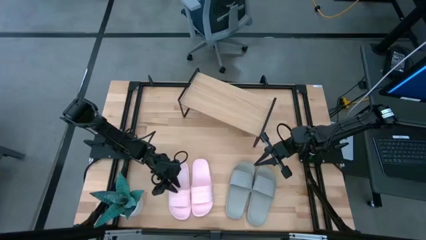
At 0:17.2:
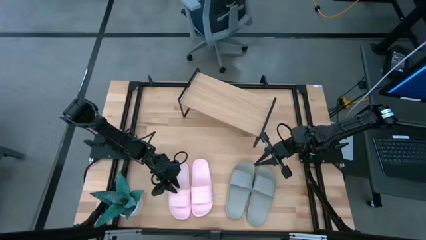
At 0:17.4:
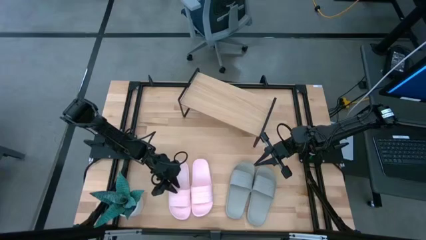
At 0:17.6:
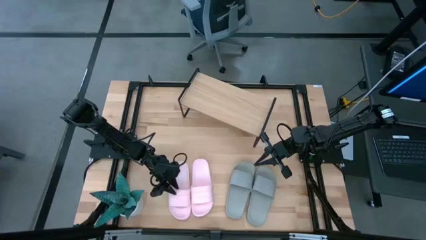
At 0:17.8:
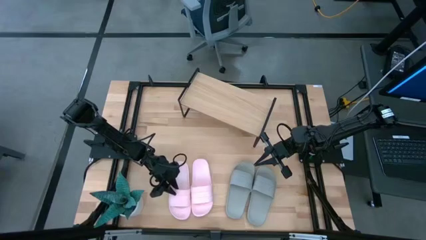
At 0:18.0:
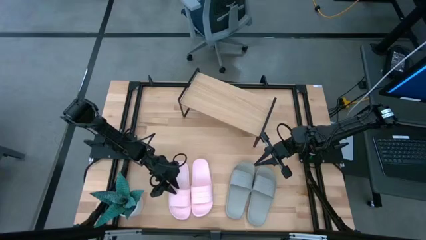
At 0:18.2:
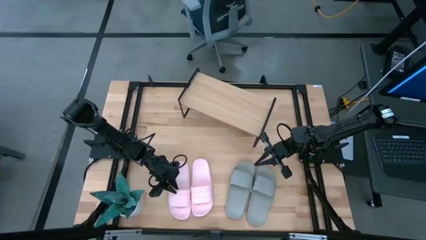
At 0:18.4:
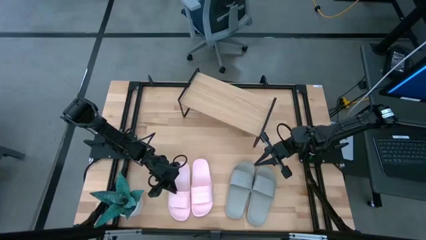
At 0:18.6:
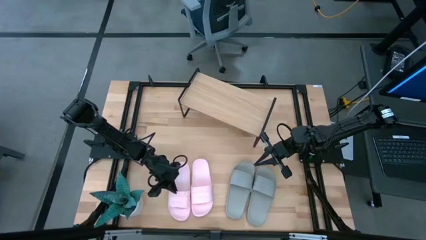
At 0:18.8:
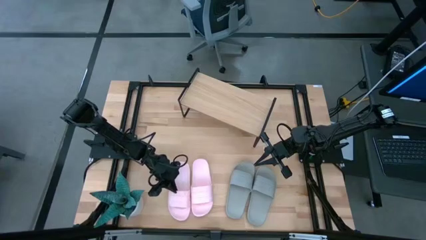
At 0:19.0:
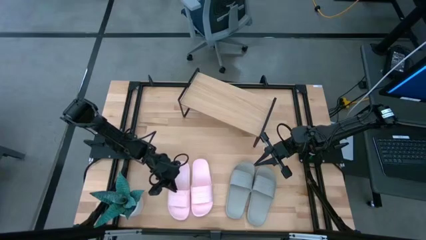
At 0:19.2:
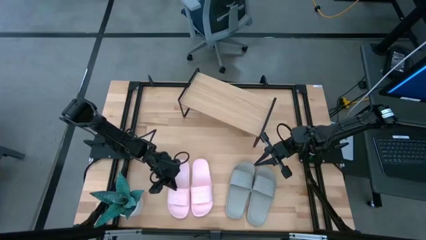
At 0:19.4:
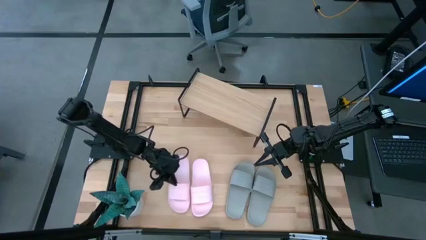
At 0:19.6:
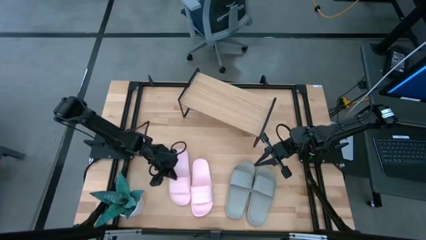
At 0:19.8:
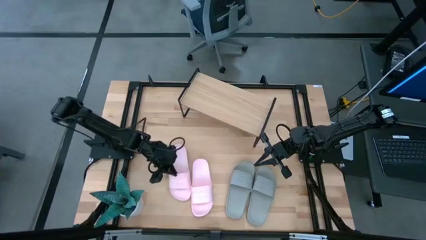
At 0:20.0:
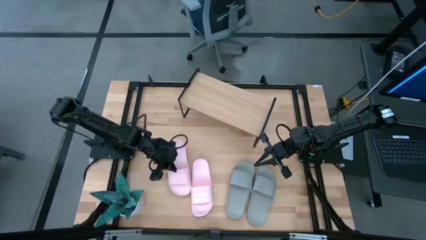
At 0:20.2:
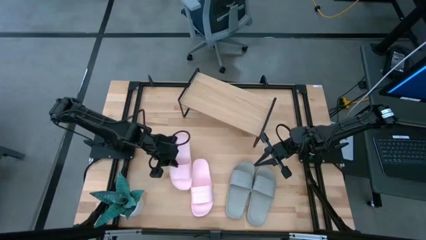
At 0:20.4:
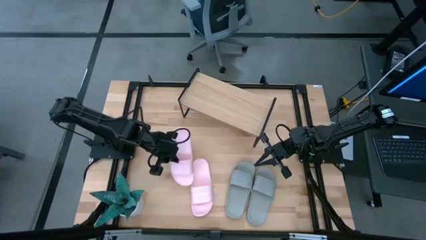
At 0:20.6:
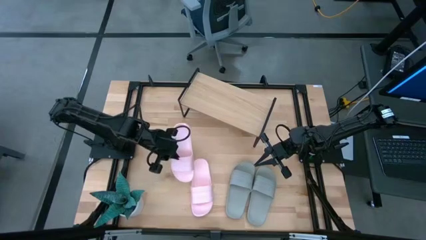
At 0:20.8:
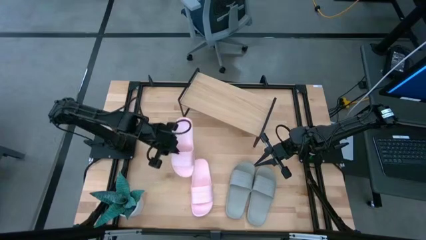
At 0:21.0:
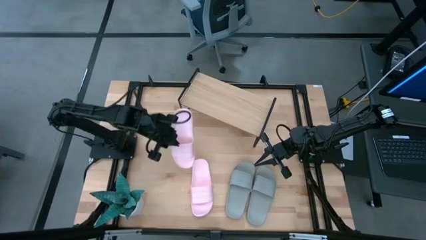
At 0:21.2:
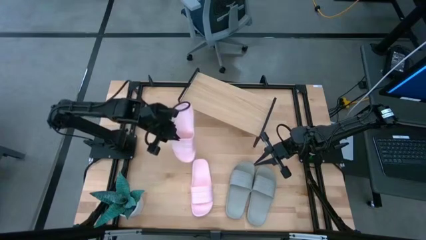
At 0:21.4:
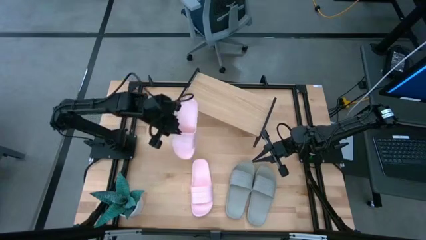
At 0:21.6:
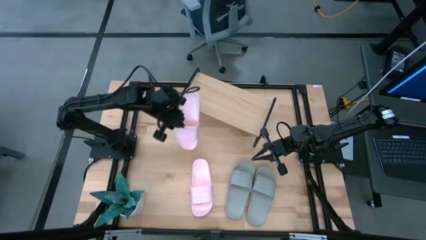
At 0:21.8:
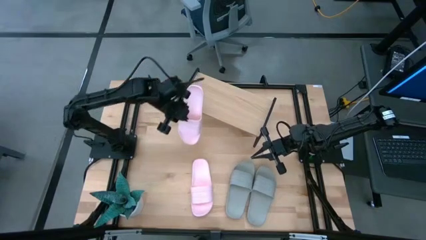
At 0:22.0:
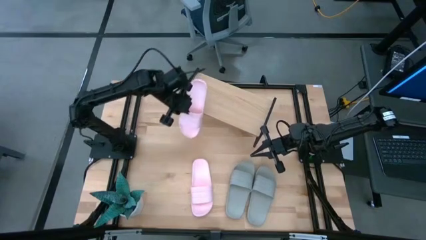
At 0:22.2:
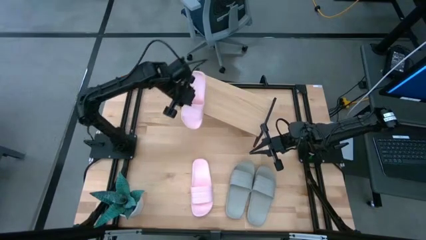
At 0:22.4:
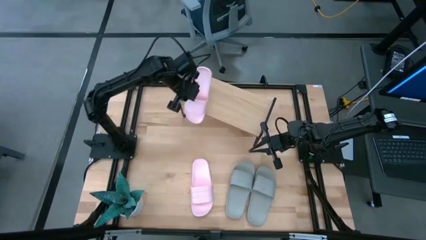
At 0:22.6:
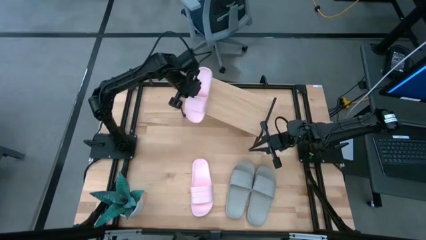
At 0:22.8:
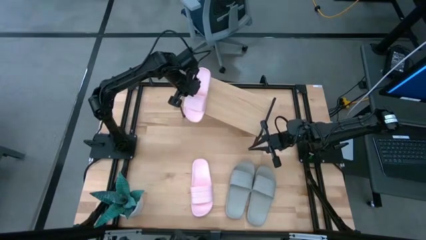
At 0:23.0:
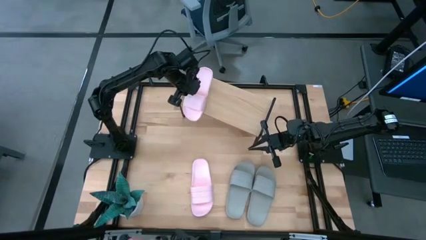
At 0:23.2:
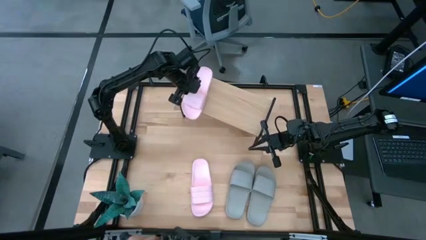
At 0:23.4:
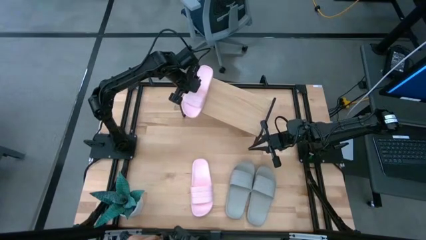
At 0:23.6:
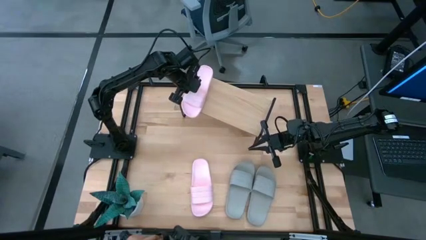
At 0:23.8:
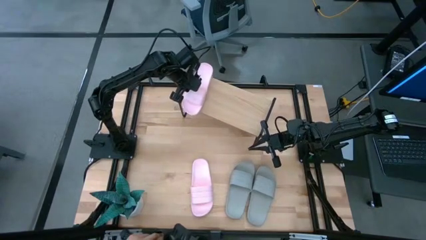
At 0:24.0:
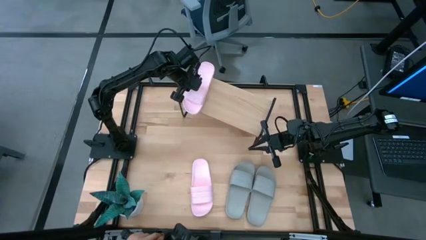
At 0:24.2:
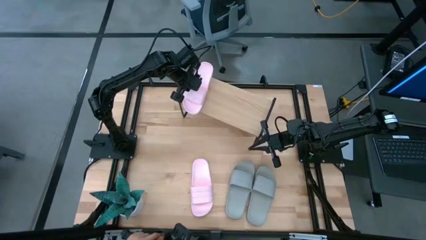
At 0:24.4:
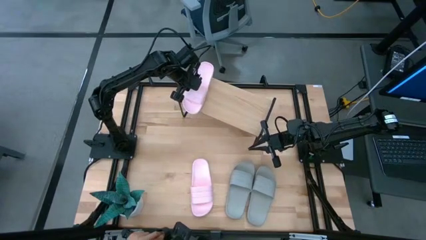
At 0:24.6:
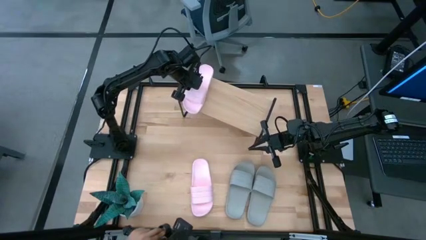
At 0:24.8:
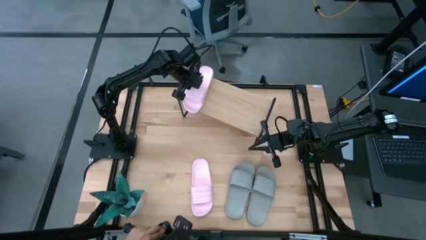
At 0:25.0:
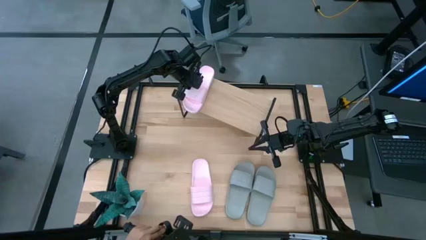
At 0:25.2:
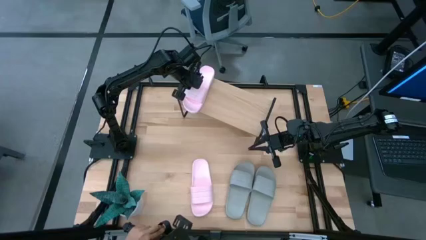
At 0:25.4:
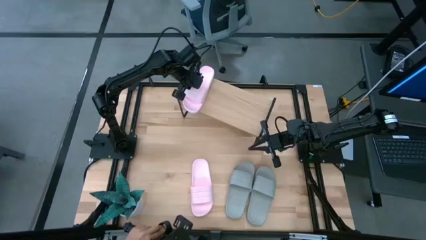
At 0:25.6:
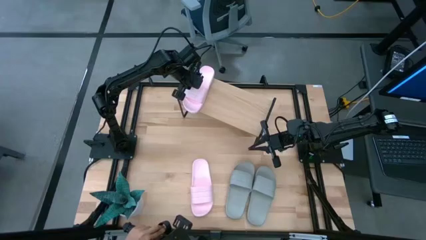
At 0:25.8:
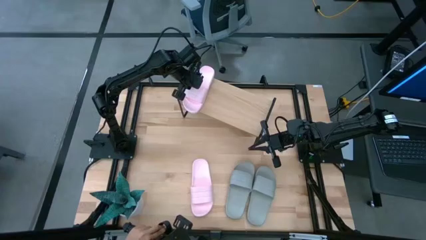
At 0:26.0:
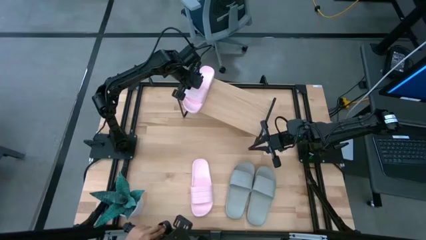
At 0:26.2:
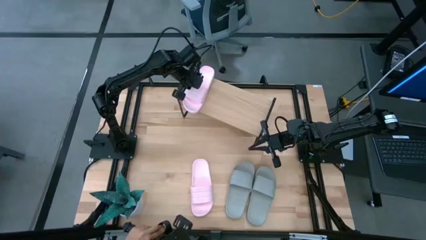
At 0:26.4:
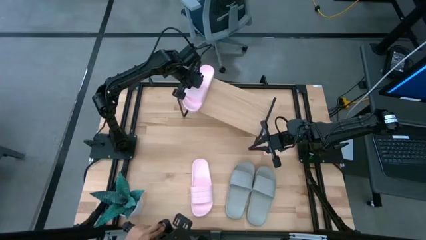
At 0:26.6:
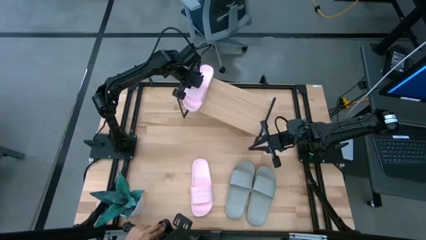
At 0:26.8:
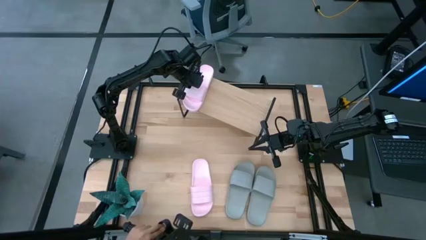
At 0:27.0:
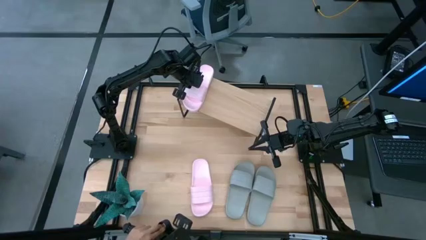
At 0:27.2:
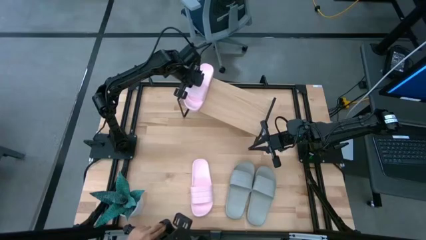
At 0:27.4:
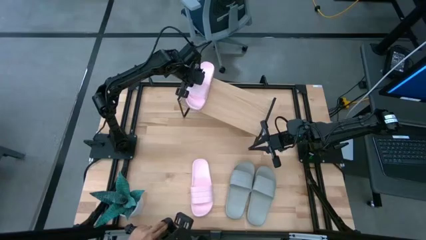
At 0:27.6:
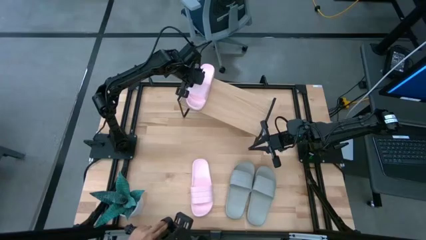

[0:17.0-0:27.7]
Task: Pick and place slides into the shelf
Put the left pink slide on the shelf
